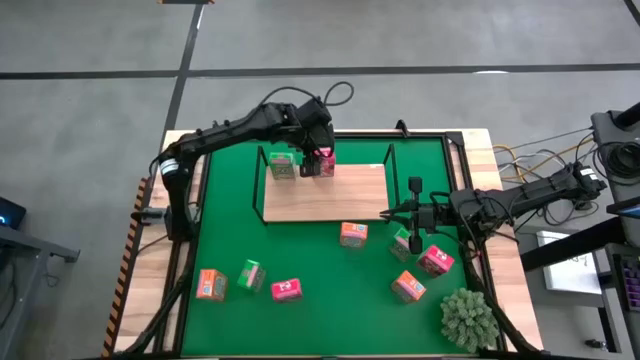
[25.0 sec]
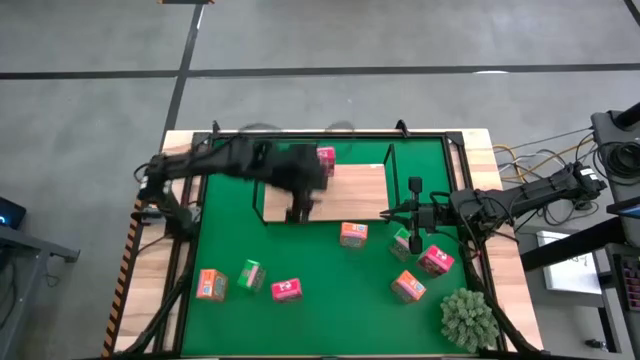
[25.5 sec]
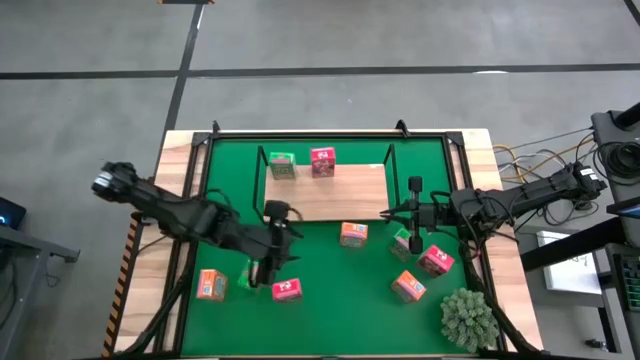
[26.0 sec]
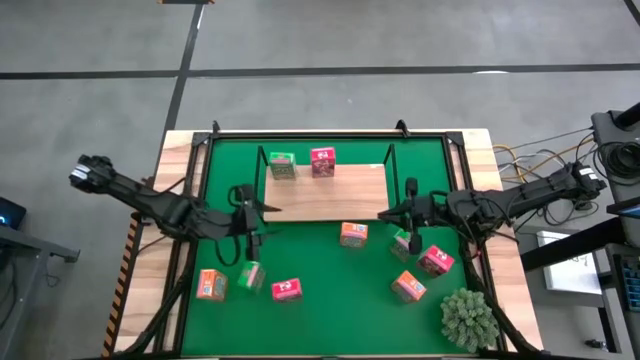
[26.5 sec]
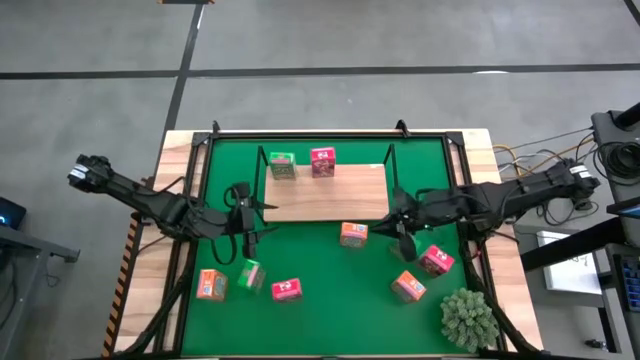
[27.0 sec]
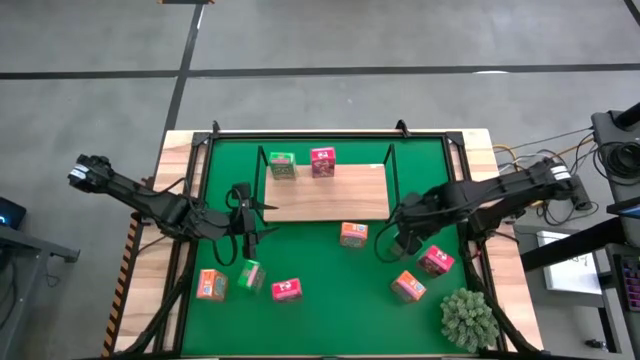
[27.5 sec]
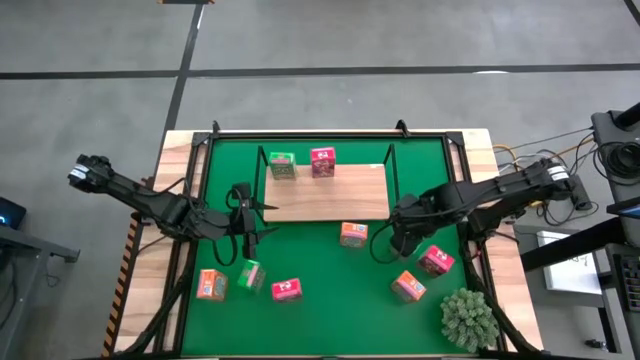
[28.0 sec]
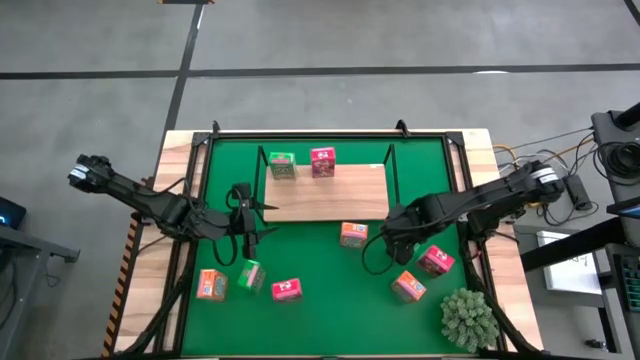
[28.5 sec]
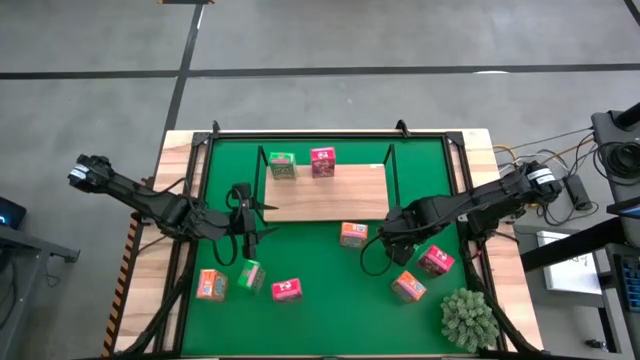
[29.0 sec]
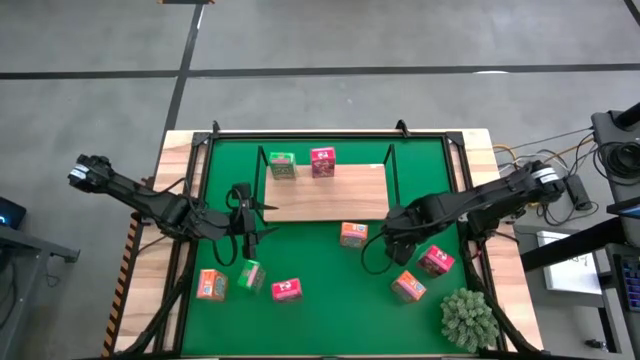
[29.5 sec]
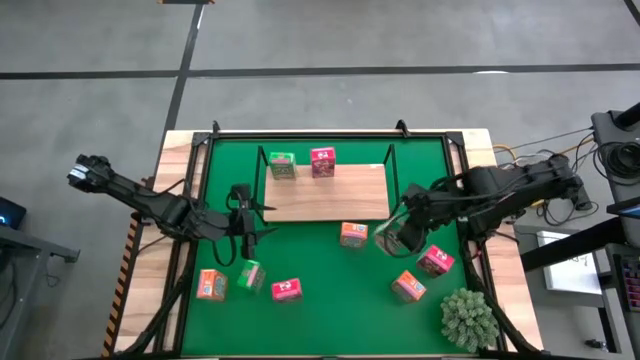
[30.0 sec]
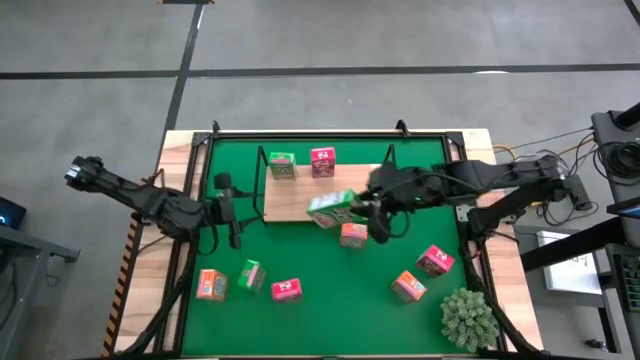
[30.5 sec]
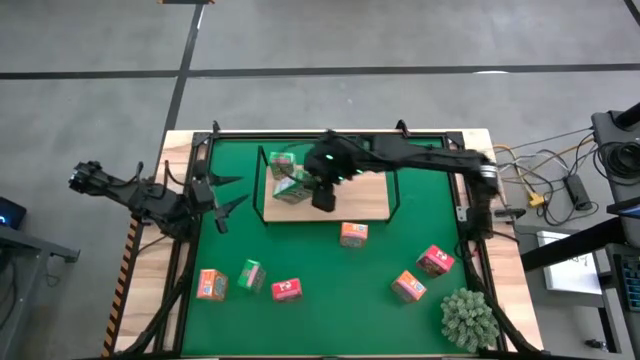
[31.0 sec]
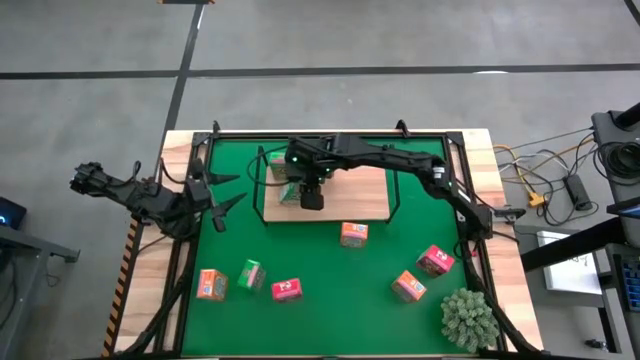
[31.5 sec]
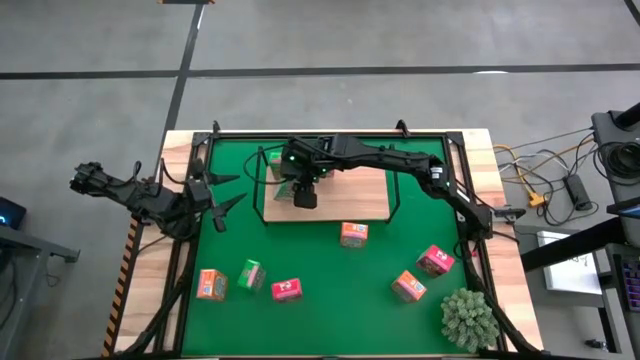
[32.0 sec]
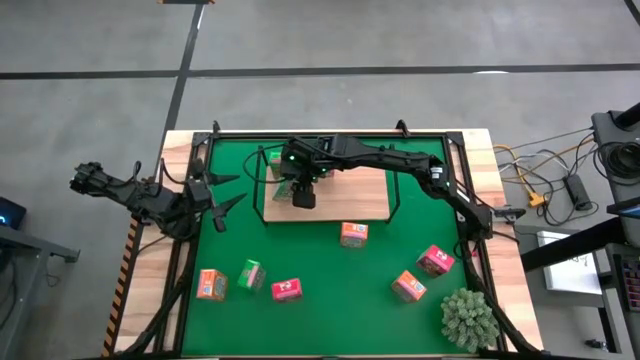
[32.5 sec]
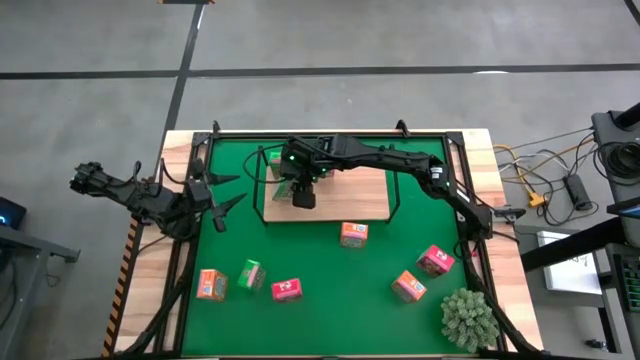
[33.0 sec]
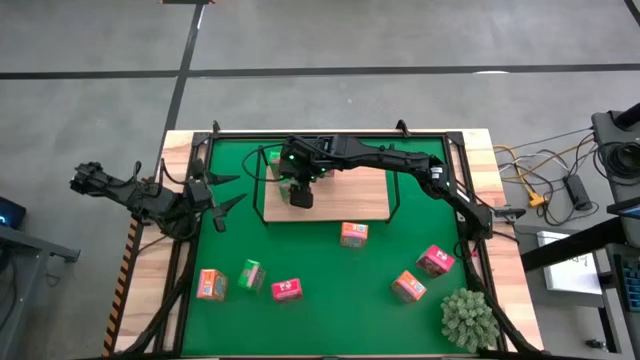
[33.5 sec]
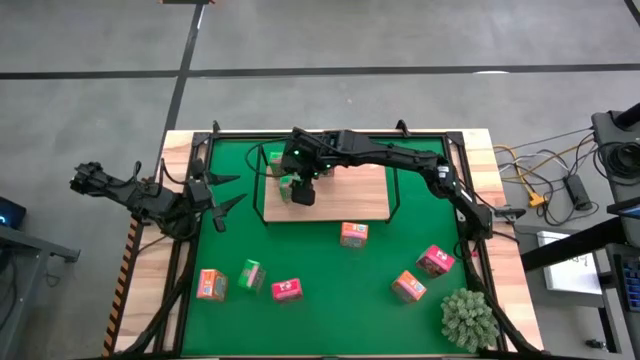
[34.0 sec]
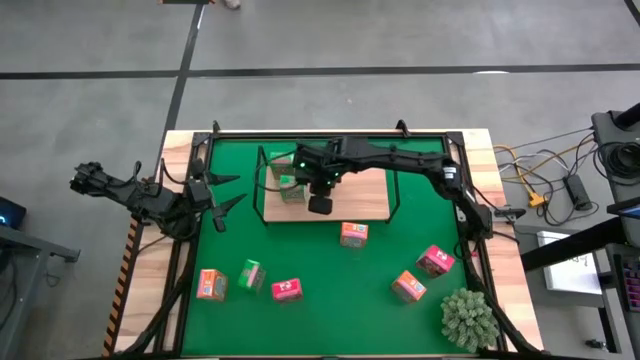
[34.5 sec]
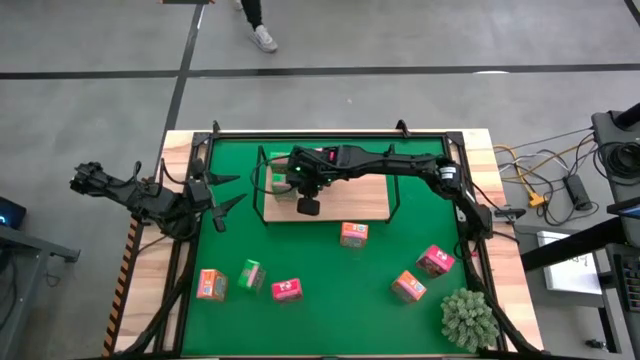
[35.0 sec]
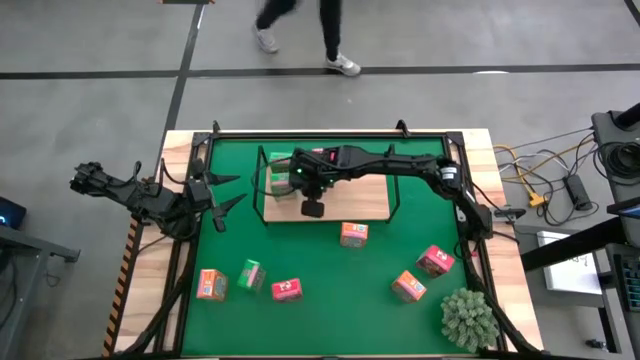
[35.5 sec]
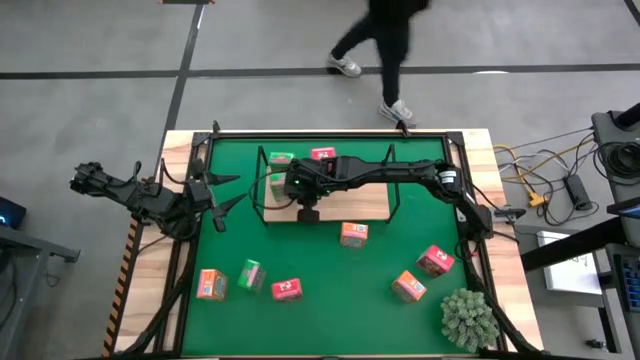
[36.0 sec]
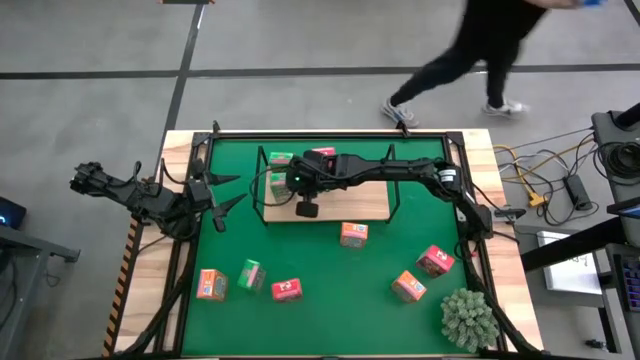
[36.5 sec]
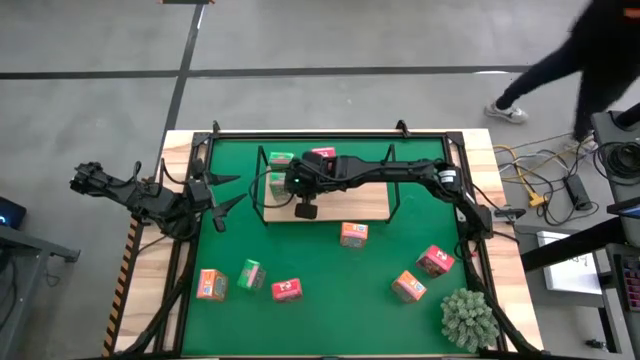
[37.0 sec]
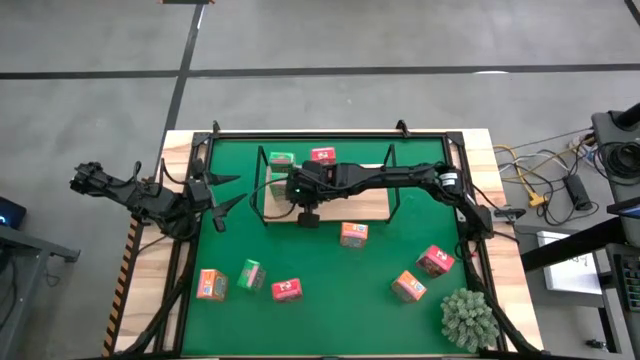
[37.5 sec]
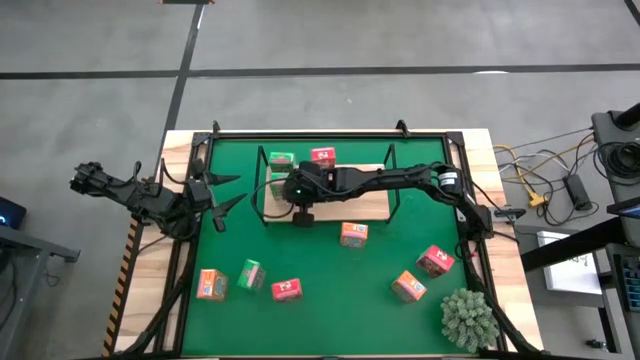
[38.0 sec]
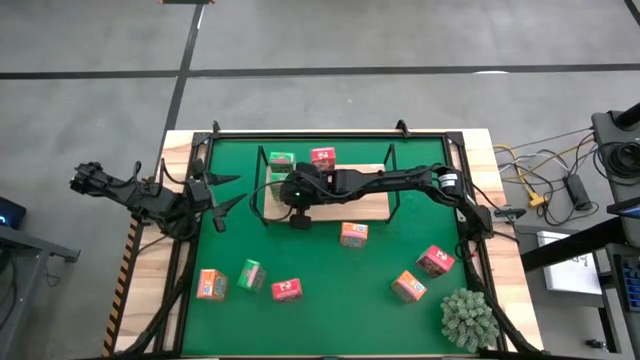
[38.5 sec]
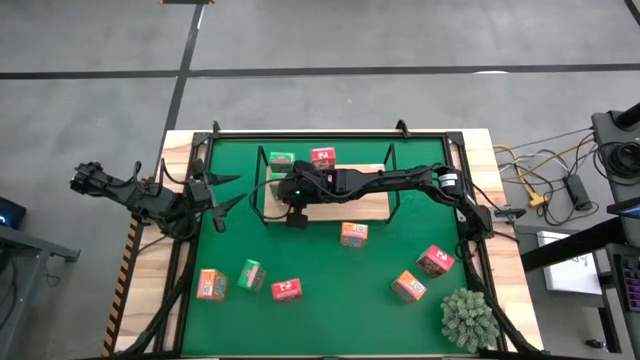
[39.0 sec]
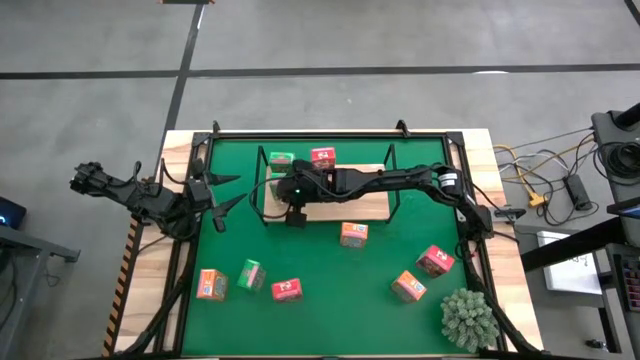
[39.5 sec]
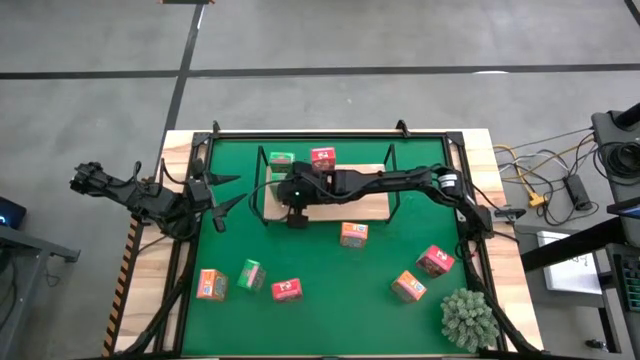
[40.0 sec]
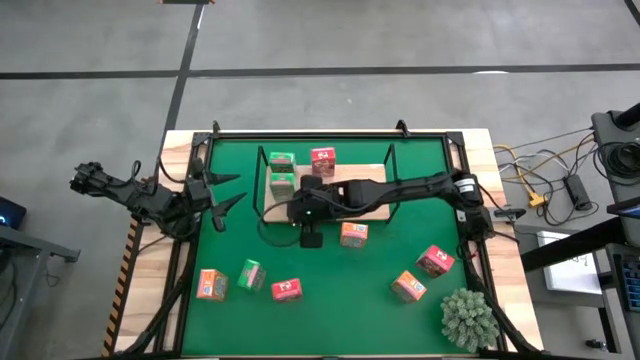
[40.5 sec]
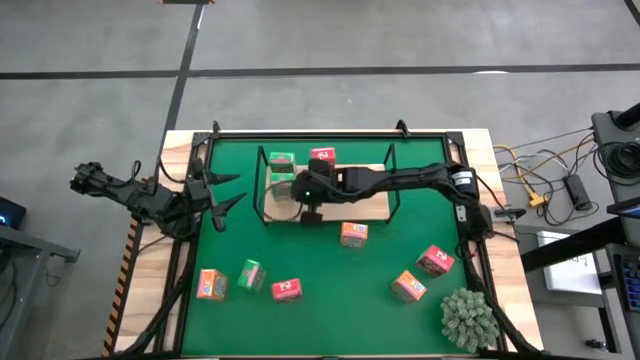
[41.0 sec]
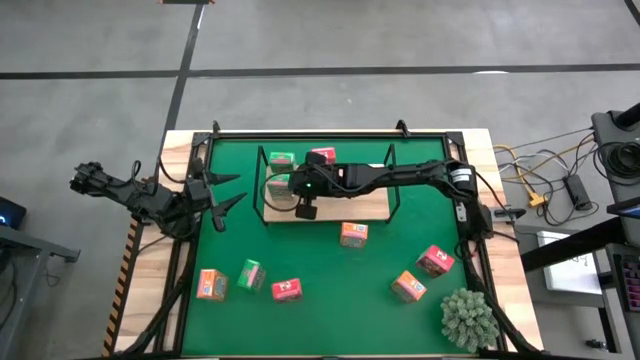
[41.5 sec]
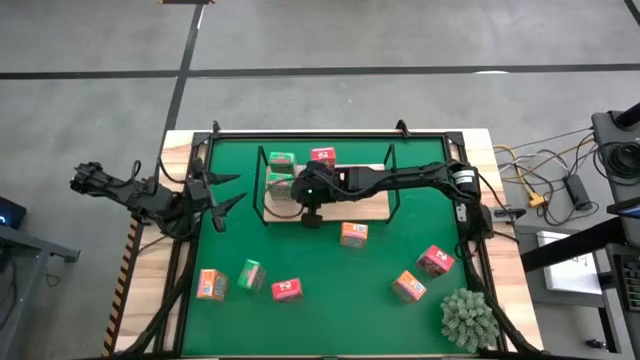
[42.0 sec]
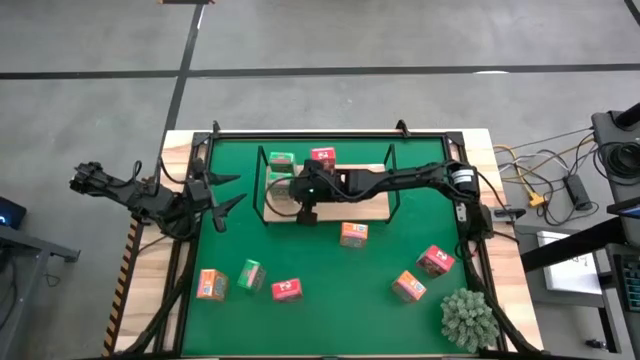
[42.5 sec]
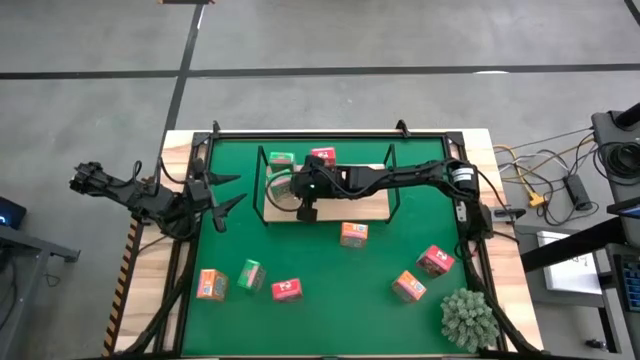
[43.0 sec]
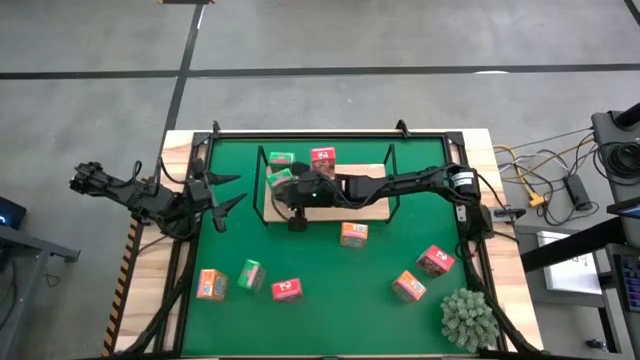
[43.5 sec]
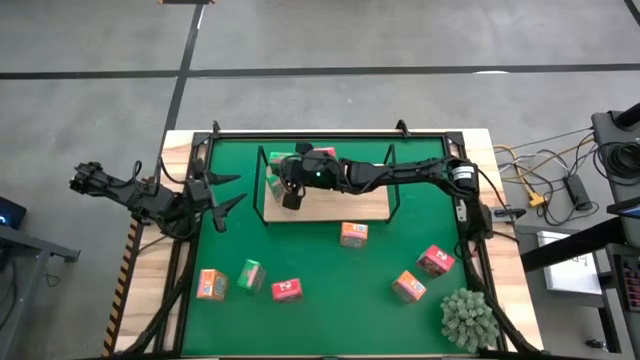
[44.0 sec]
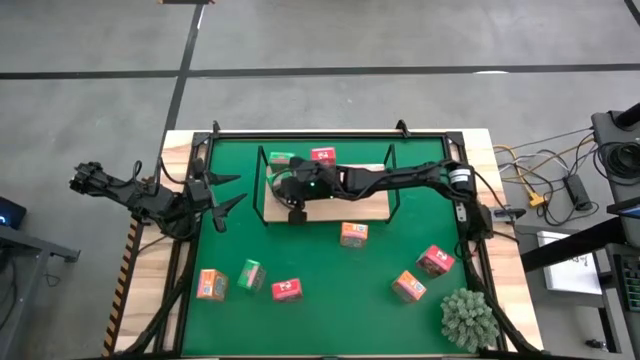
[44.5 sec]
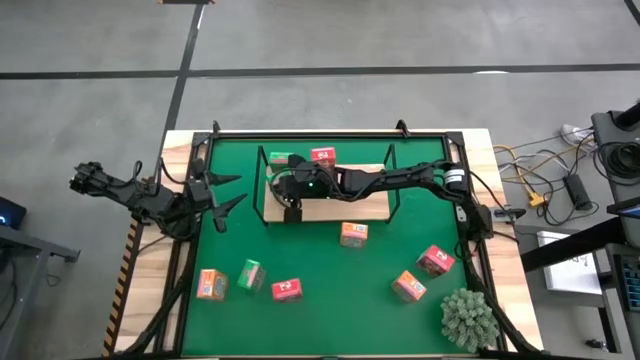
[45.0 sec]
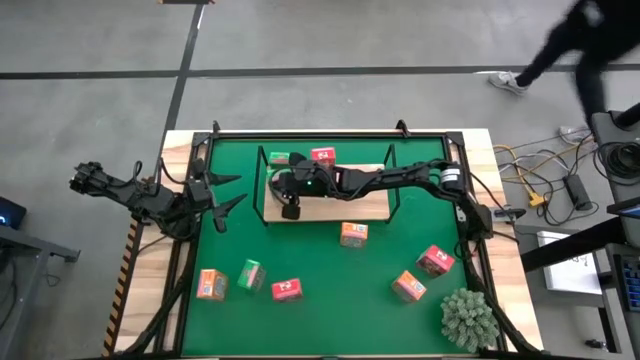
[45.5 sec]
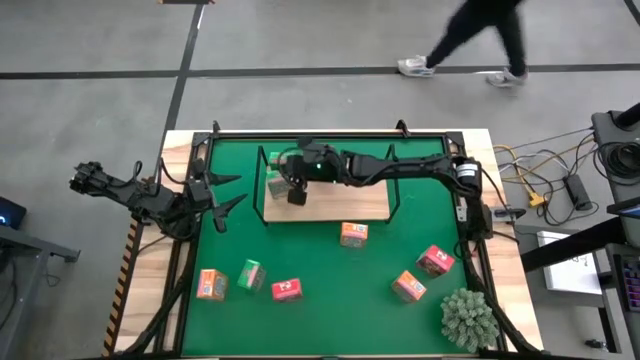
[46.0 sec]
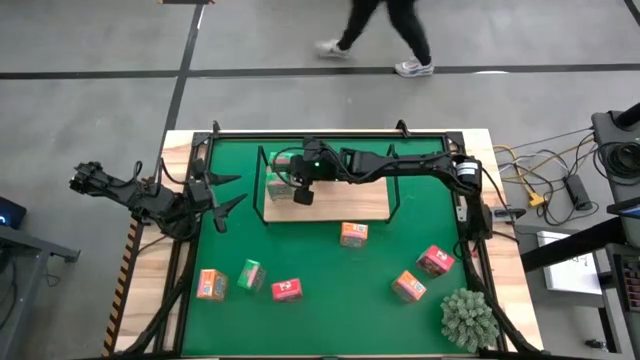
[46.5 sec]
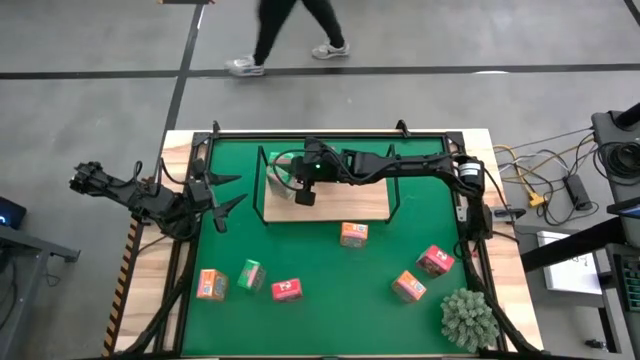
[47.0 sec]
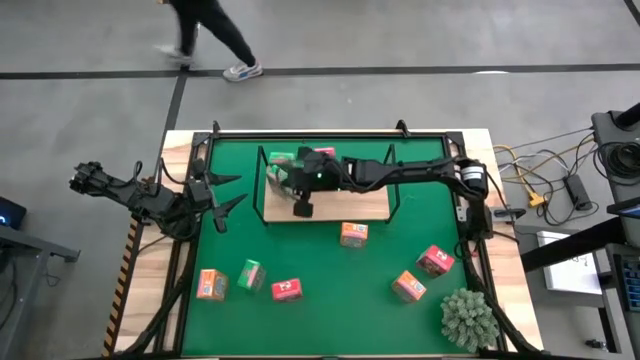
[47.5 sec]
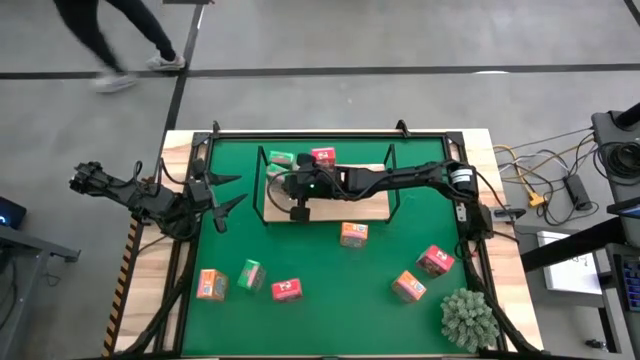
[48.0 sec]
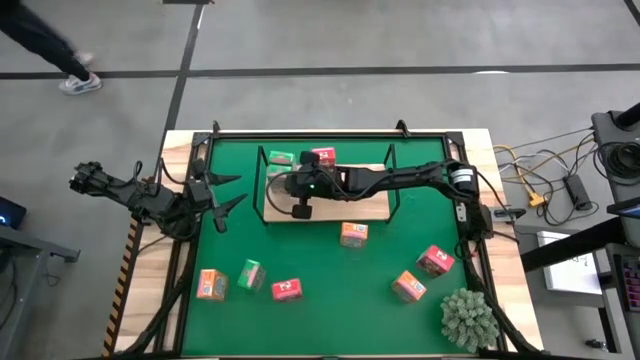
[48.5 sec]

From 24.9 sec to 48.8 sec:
Task: Stack cereal on shelf
Put the right green cereal box on the shelf aligned with the other green cereal box
